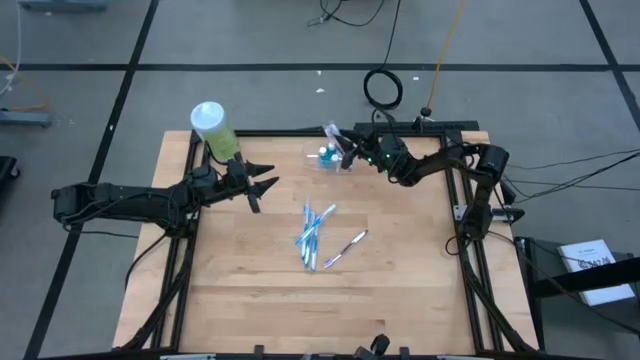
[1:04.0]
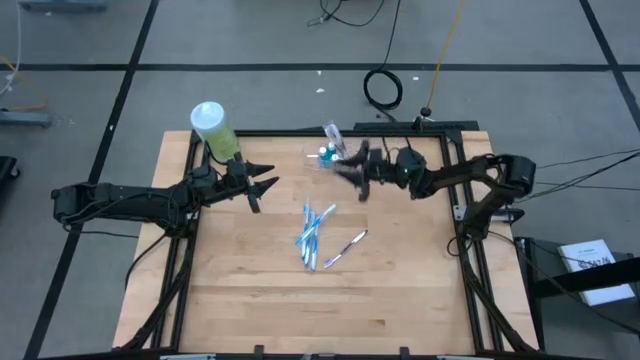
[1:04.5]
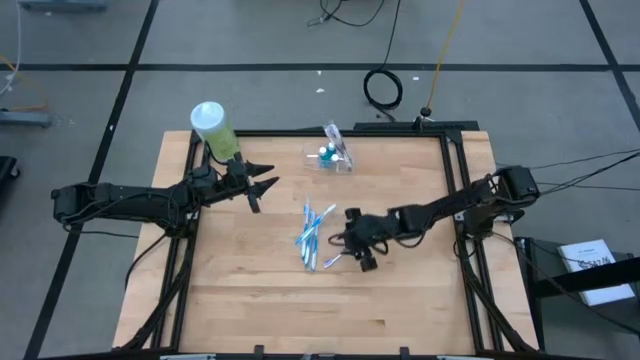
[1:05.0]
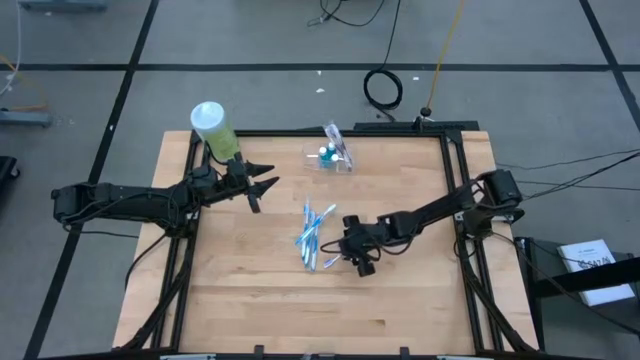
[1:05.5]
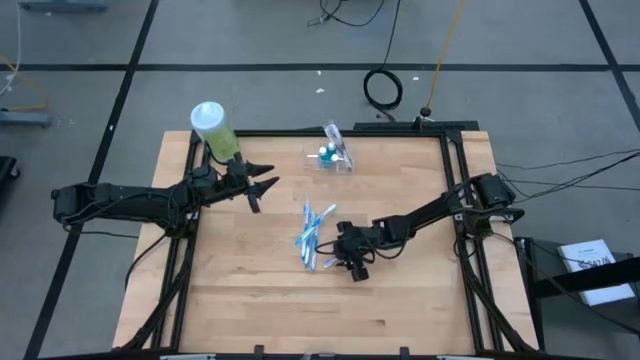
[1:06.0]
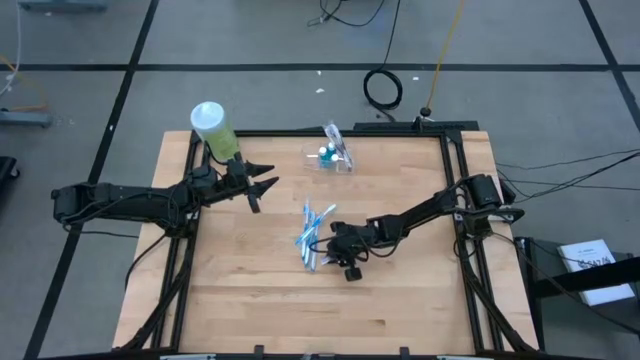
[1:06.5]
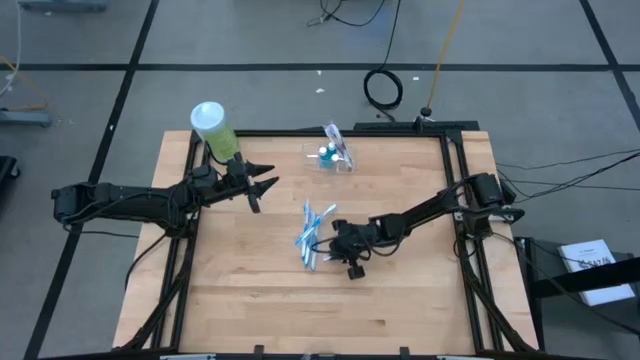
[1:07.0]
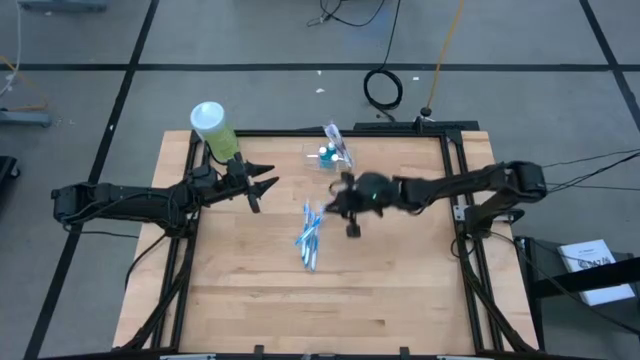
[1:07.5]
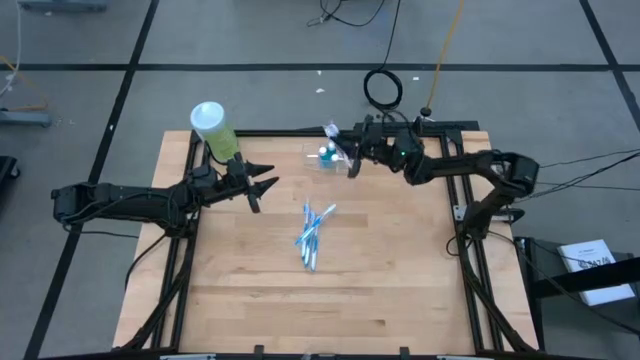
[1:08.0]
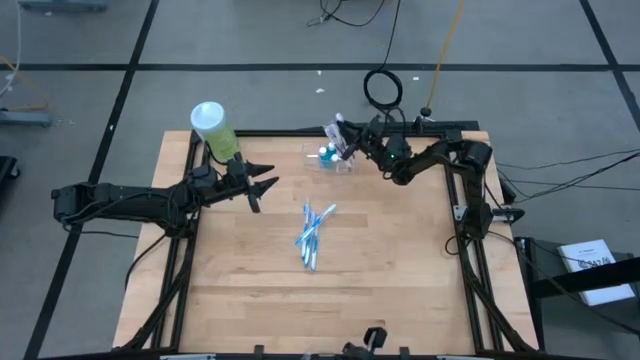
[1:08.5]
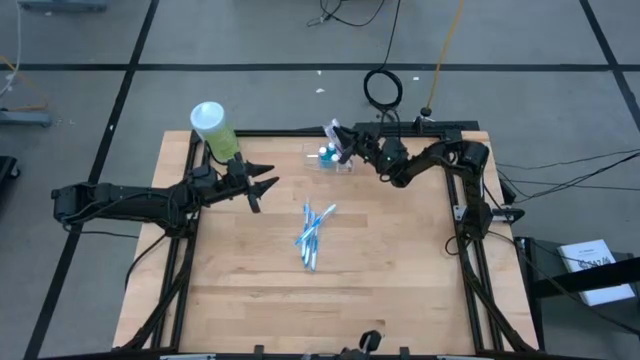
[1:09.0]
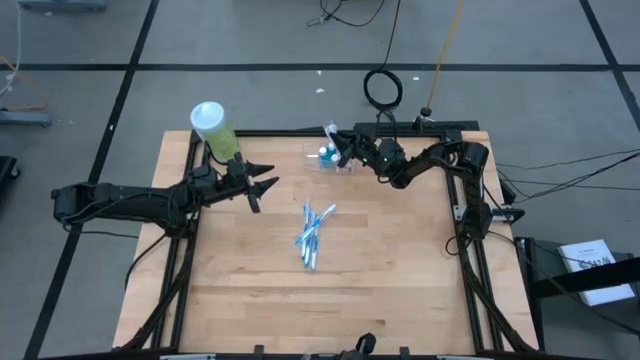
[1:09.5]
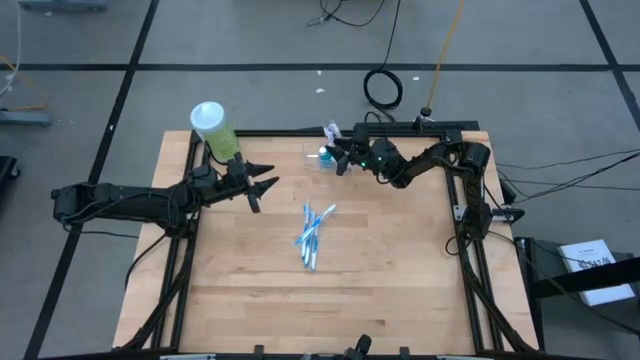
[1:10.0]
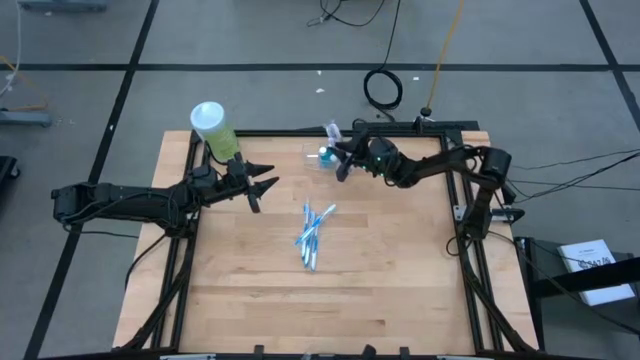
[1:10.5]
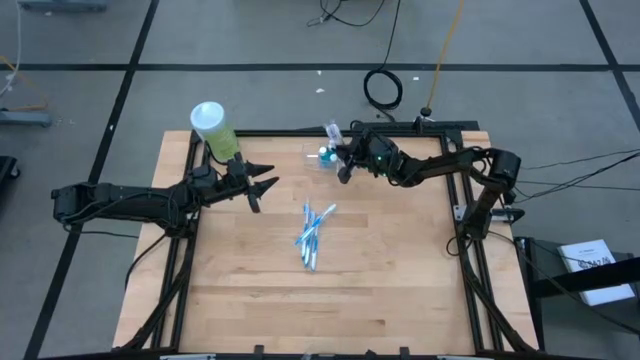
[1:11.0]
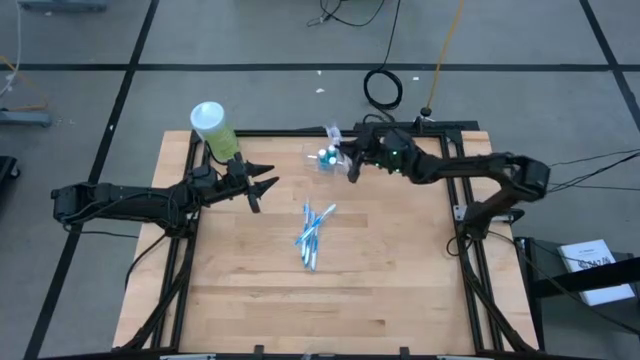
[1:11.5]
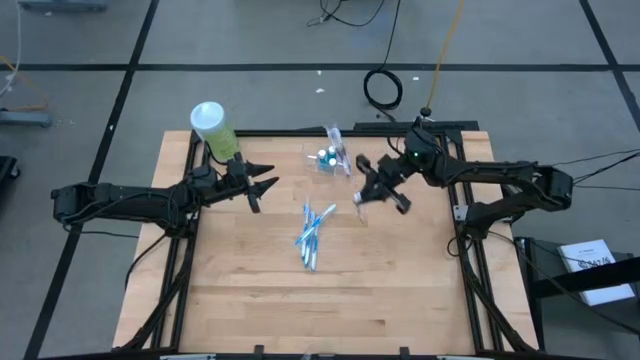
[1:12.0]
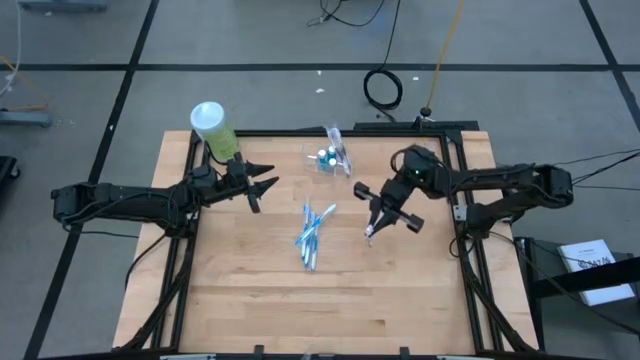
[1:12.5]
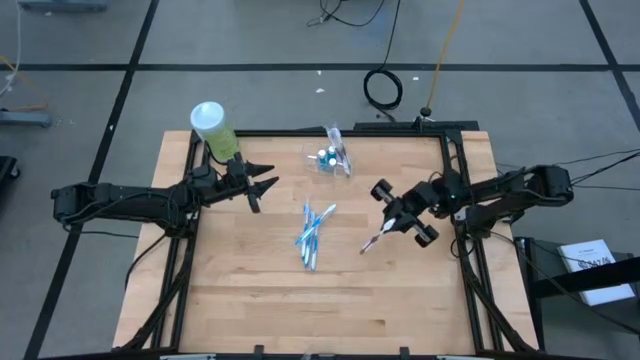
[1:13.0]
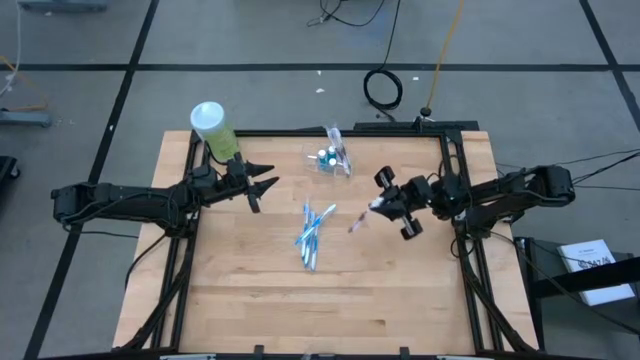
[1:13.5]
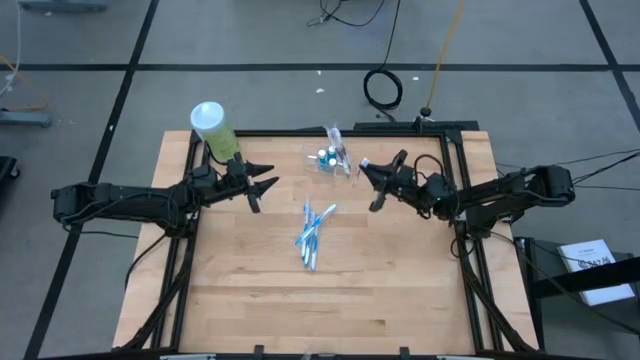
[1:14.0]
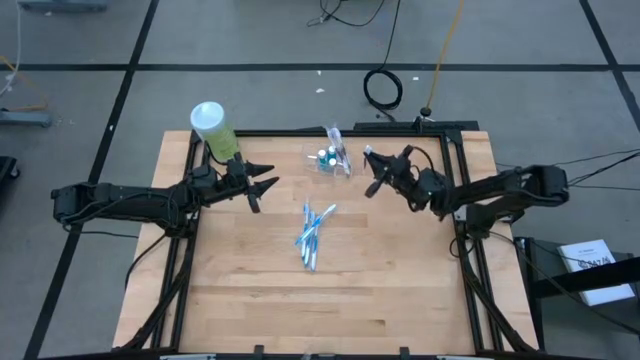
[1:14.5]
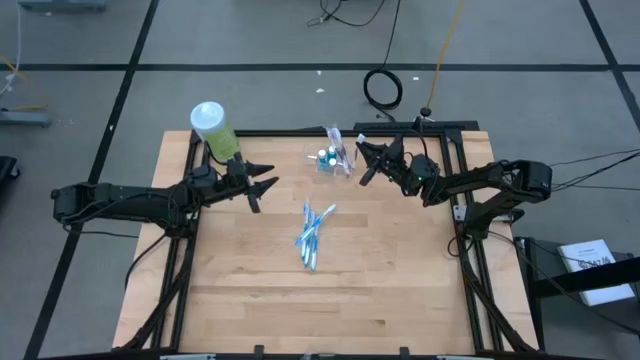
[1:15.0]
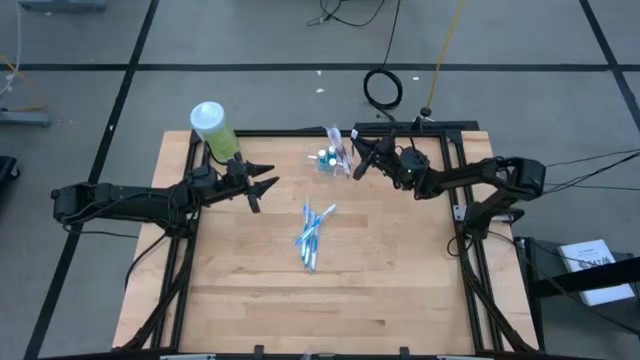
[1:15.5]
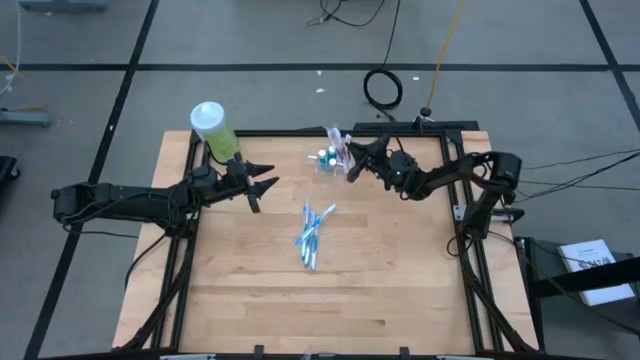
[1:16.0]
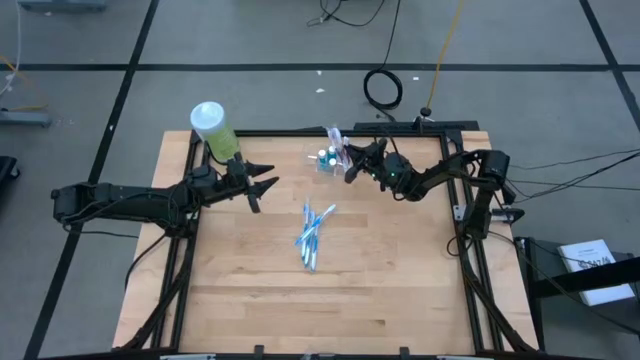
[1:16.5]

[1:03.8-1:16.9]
Task: Pick & Place toothbrushing station
Put the purple toothbrush into the transparent organizer

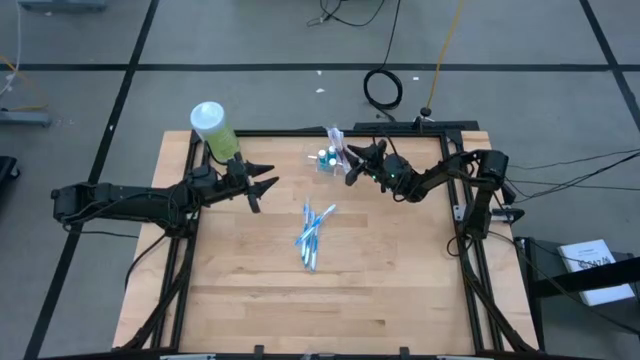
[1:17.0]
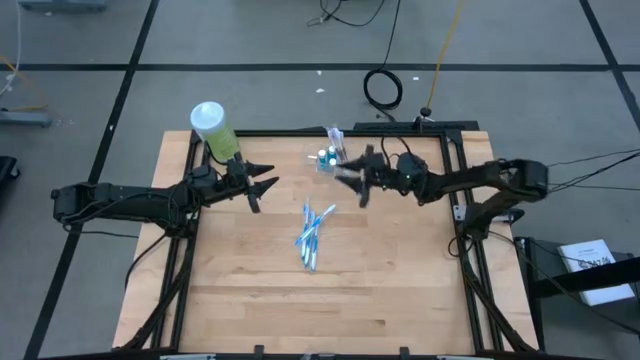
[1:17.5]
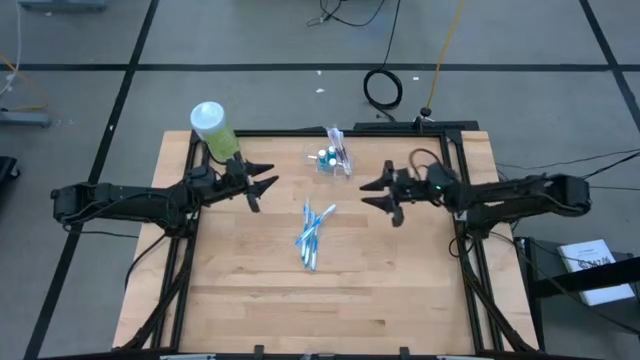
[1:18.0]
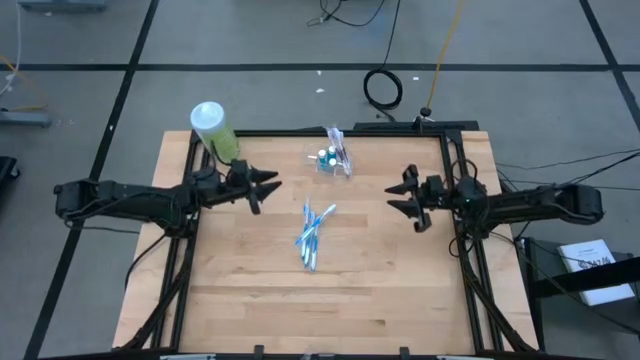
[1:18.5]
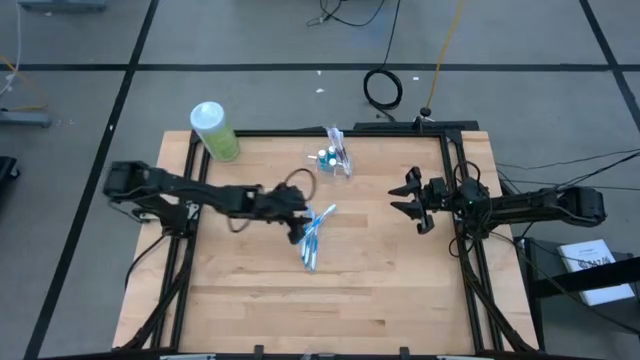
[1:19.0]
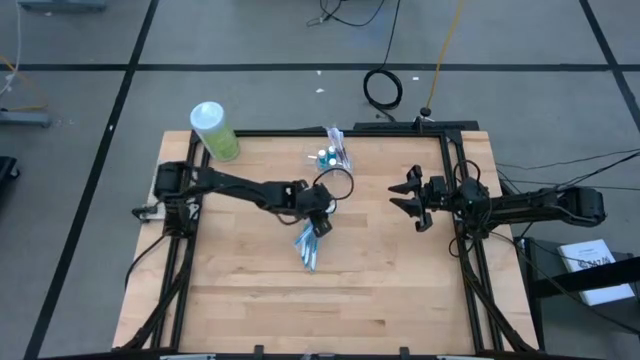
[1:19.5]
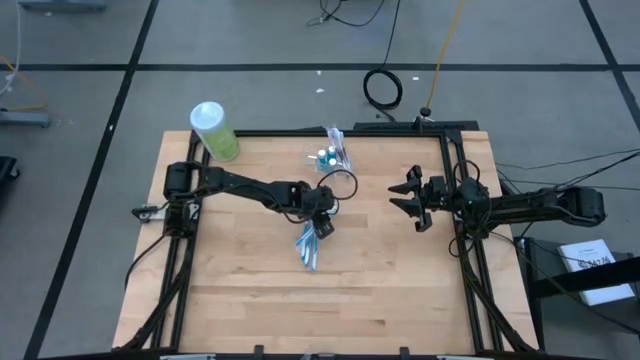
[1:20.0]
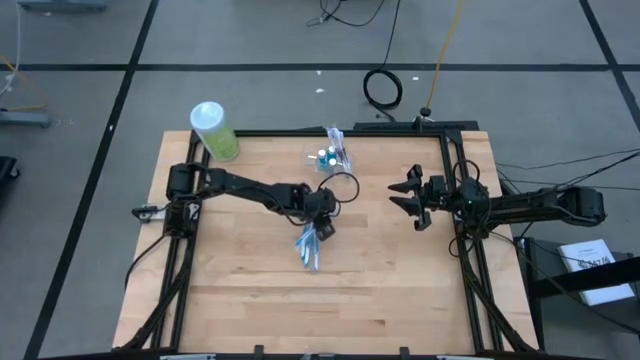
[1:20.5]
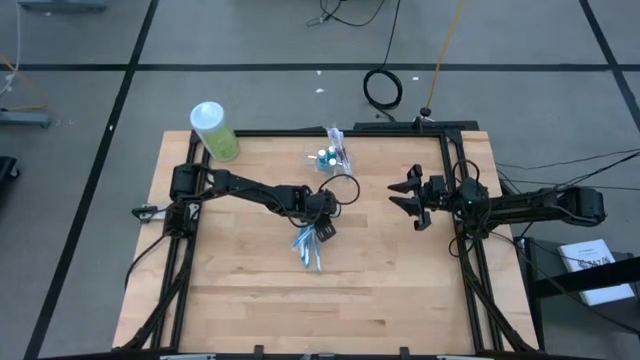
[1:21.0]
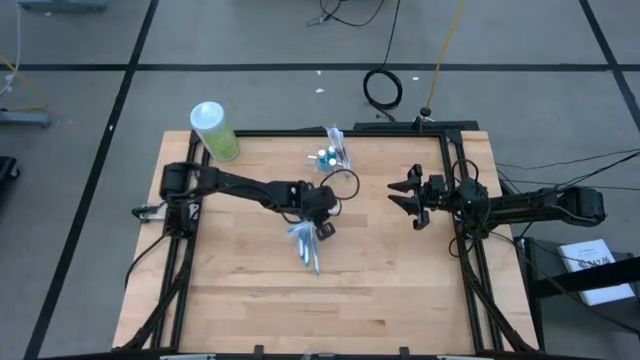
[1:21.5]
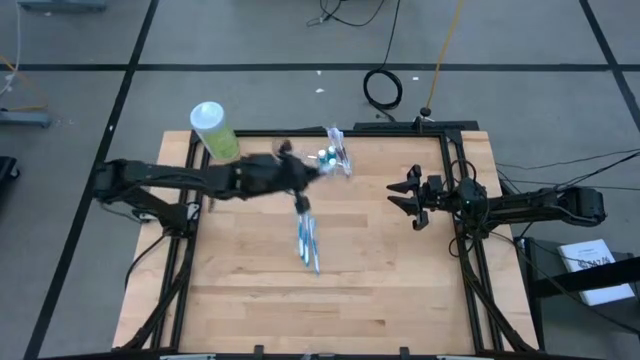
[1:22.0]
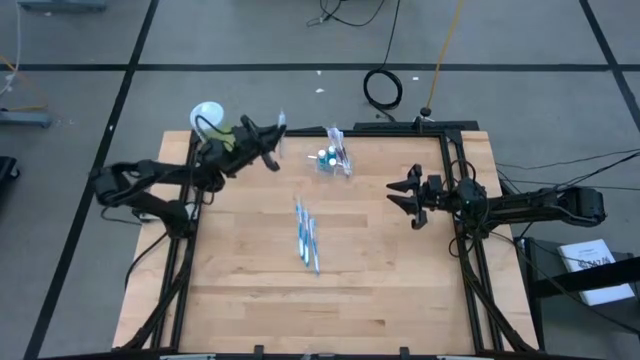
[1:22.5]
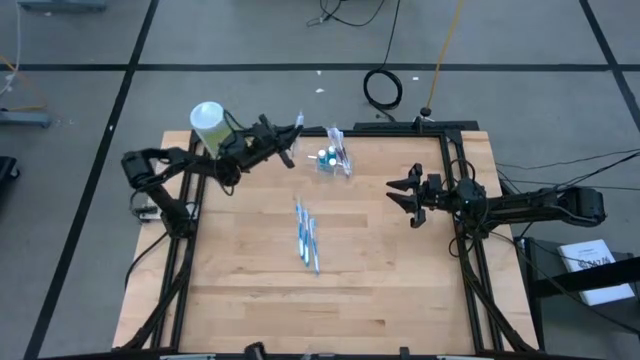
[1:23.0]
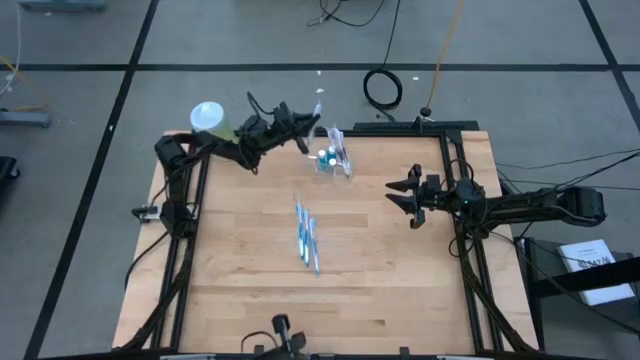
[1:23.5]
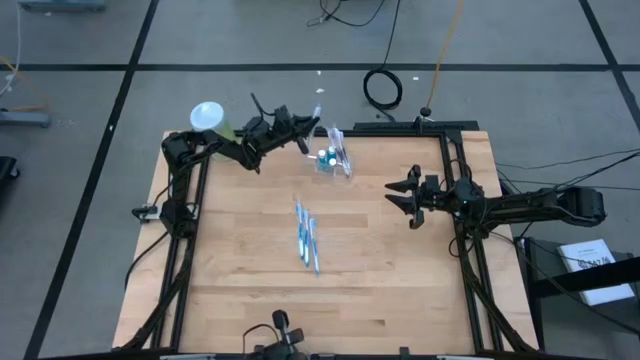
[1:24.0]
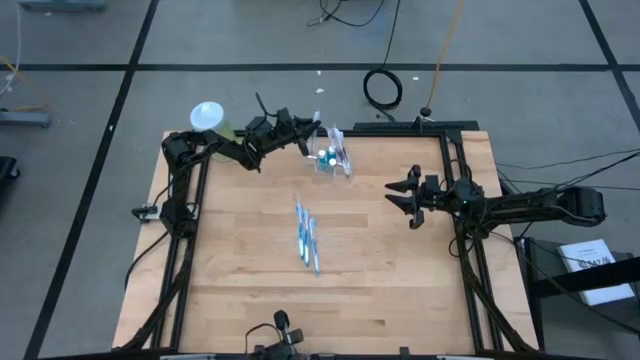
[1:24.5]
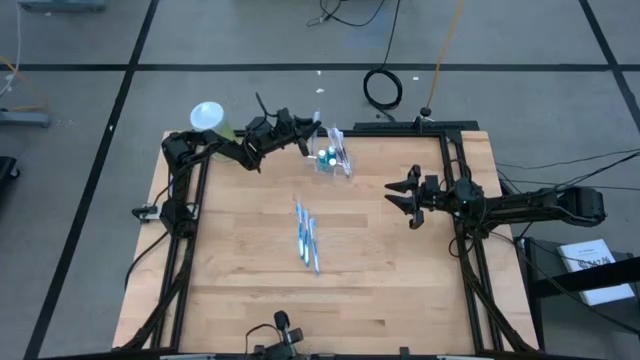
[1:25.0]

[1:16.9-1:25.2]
Put the blue toothbrush into the transparent organizer
